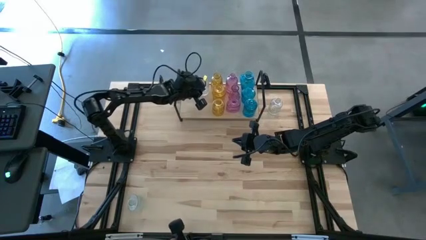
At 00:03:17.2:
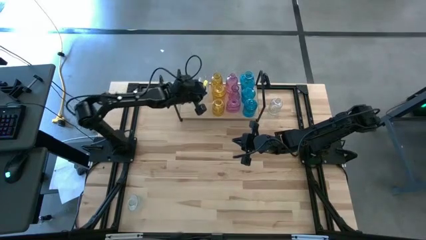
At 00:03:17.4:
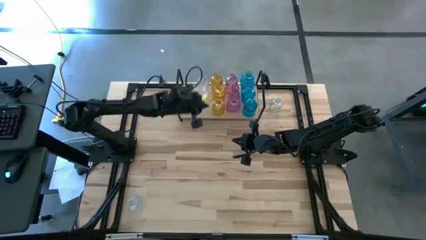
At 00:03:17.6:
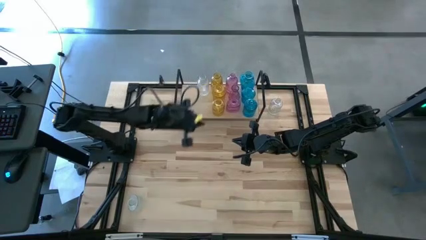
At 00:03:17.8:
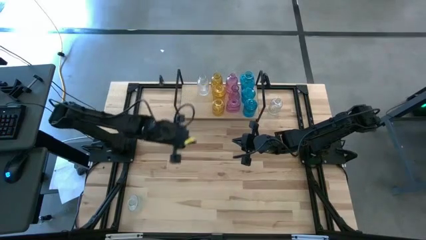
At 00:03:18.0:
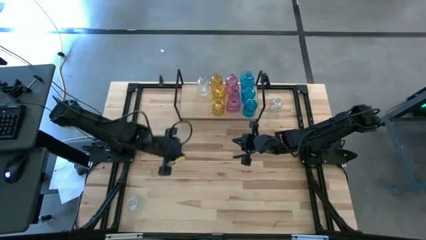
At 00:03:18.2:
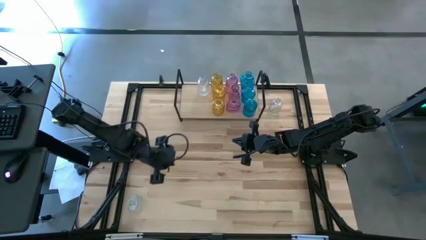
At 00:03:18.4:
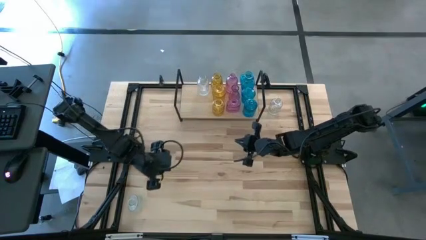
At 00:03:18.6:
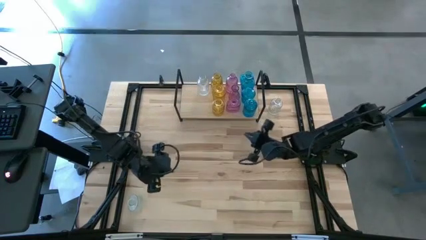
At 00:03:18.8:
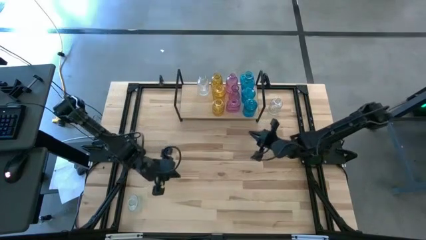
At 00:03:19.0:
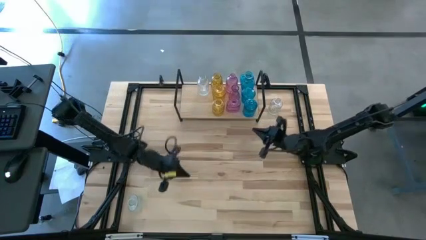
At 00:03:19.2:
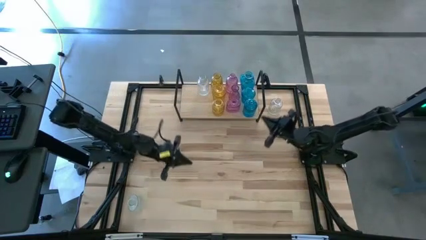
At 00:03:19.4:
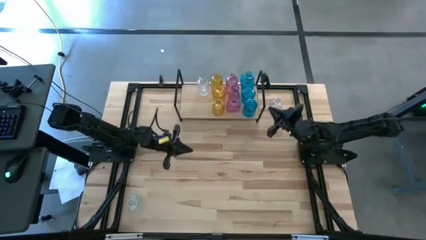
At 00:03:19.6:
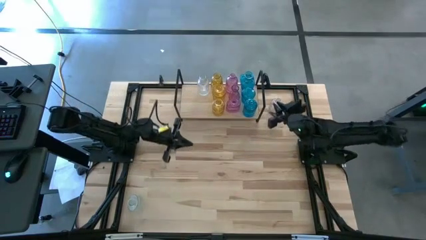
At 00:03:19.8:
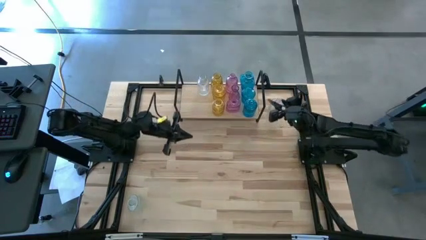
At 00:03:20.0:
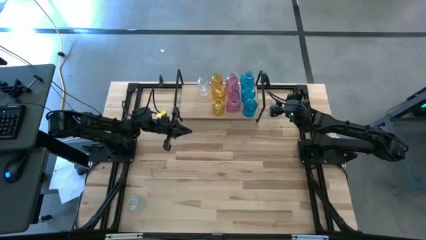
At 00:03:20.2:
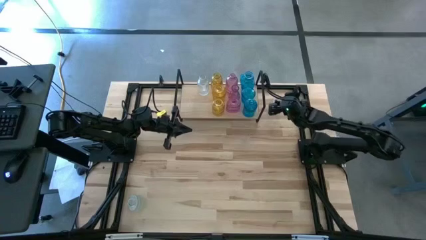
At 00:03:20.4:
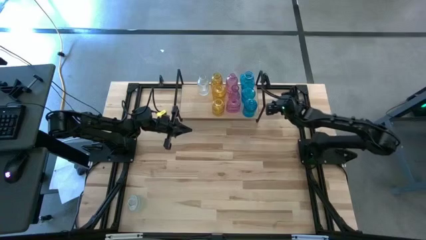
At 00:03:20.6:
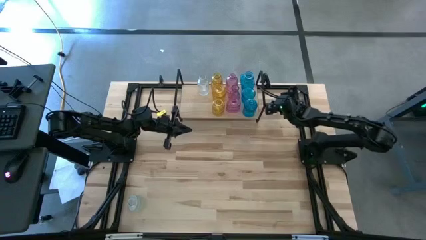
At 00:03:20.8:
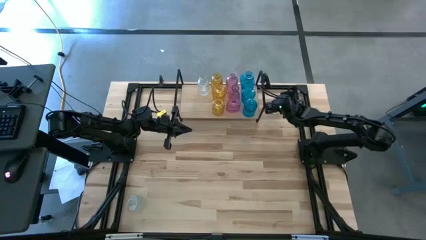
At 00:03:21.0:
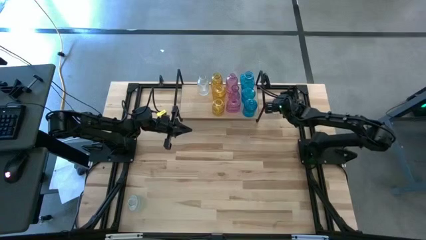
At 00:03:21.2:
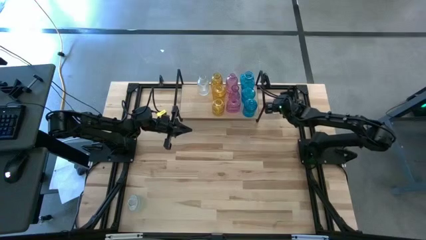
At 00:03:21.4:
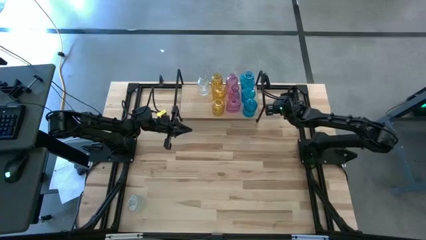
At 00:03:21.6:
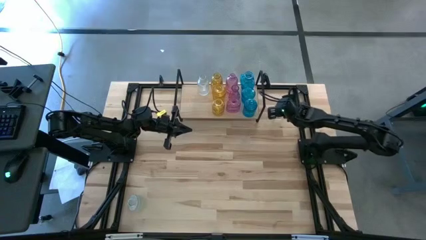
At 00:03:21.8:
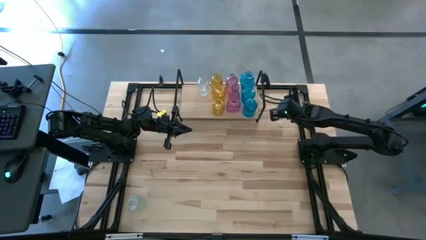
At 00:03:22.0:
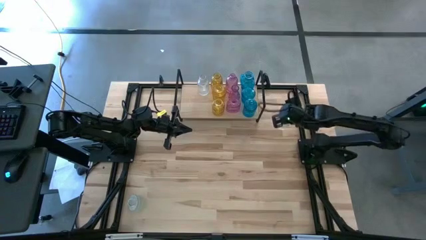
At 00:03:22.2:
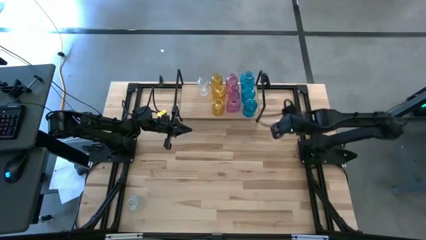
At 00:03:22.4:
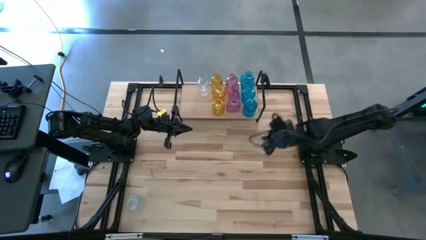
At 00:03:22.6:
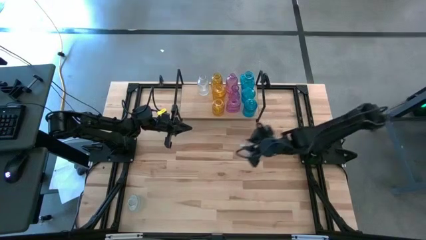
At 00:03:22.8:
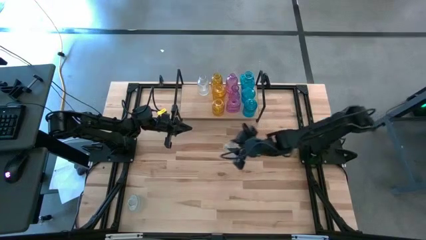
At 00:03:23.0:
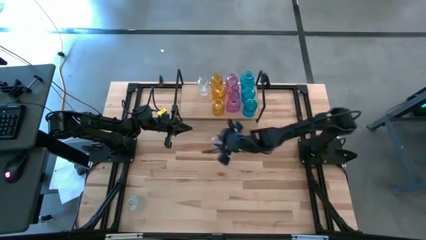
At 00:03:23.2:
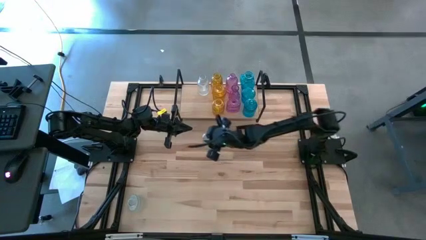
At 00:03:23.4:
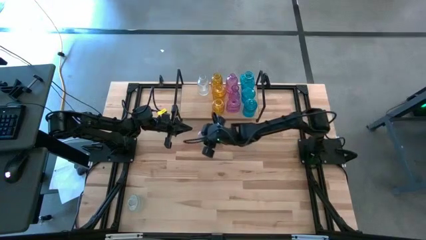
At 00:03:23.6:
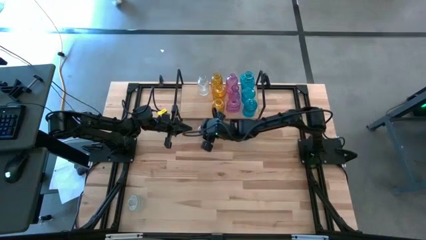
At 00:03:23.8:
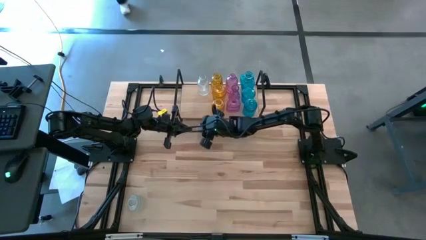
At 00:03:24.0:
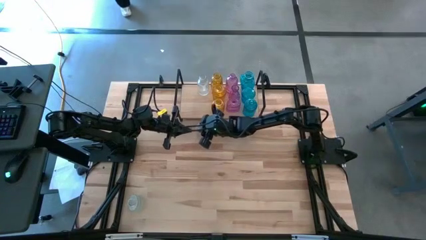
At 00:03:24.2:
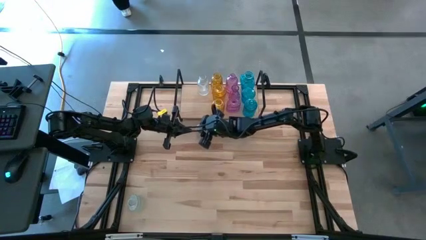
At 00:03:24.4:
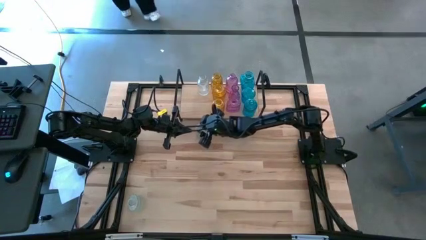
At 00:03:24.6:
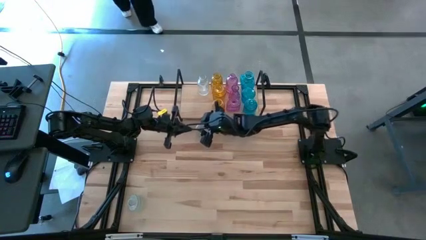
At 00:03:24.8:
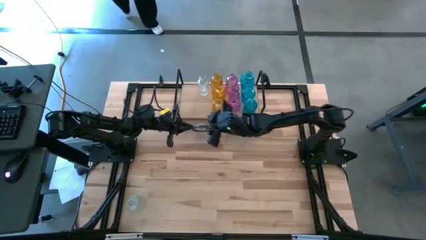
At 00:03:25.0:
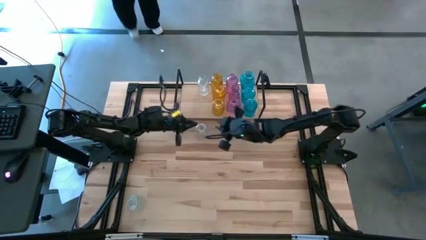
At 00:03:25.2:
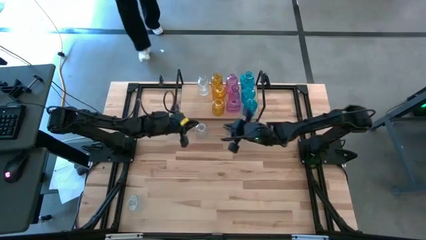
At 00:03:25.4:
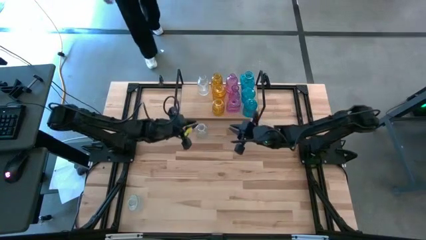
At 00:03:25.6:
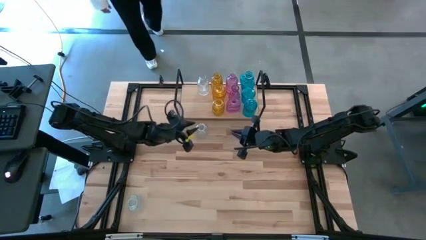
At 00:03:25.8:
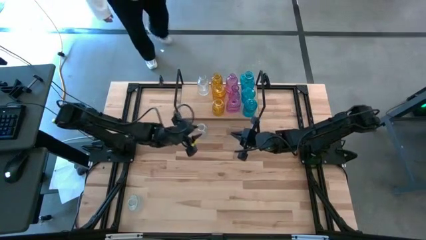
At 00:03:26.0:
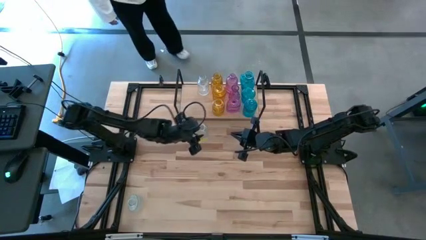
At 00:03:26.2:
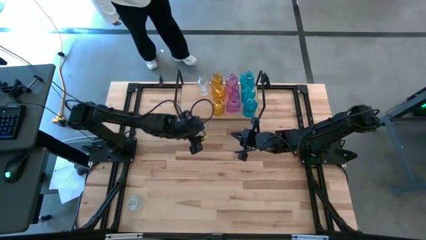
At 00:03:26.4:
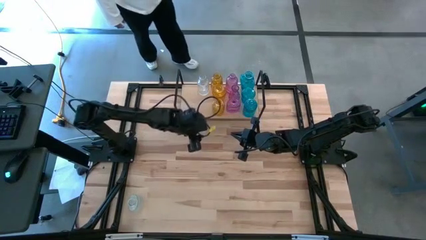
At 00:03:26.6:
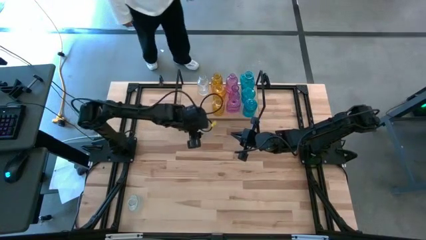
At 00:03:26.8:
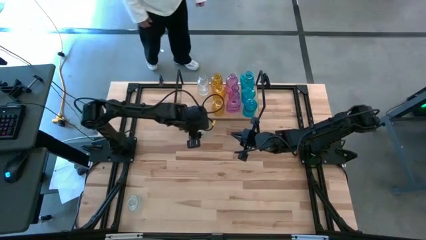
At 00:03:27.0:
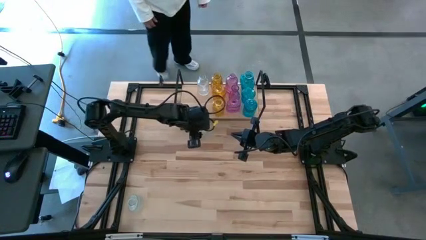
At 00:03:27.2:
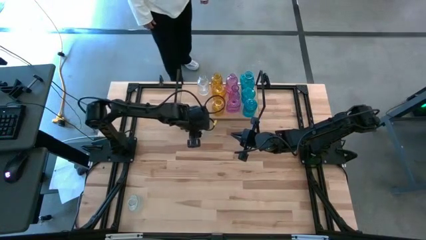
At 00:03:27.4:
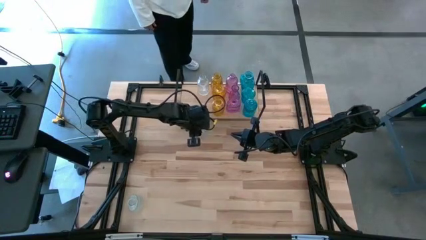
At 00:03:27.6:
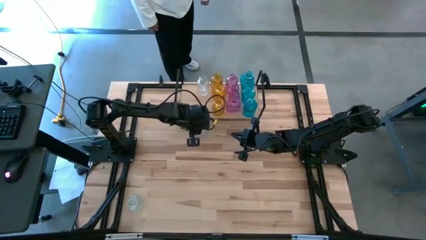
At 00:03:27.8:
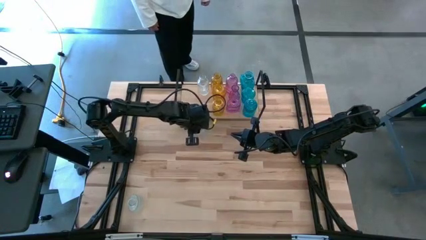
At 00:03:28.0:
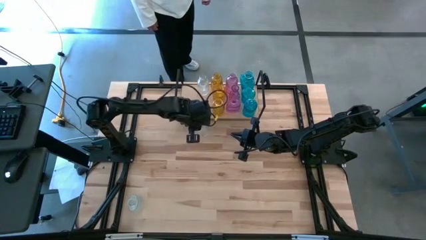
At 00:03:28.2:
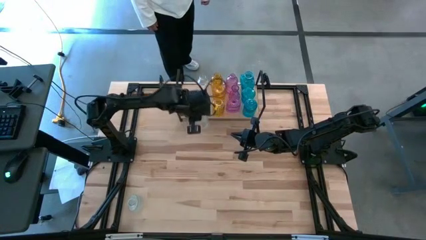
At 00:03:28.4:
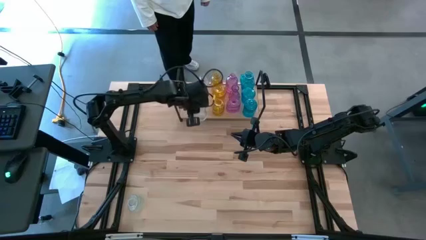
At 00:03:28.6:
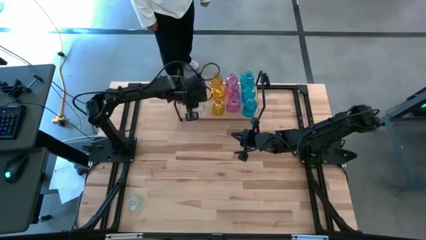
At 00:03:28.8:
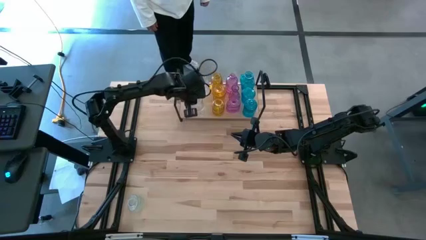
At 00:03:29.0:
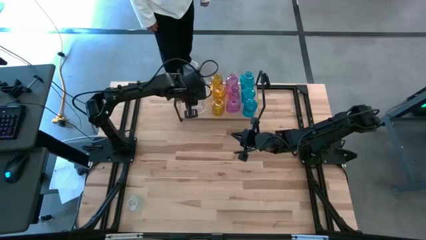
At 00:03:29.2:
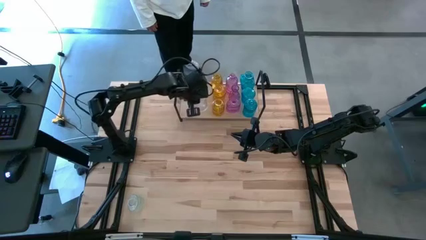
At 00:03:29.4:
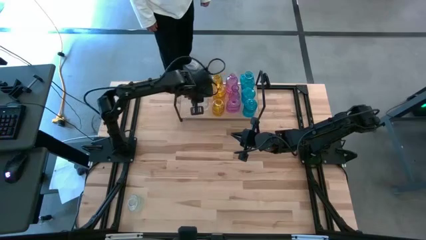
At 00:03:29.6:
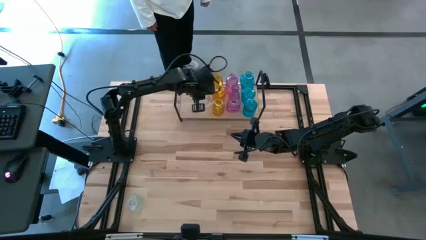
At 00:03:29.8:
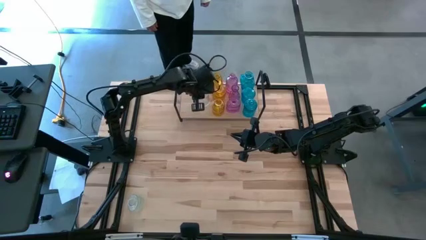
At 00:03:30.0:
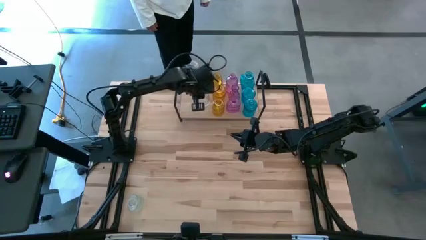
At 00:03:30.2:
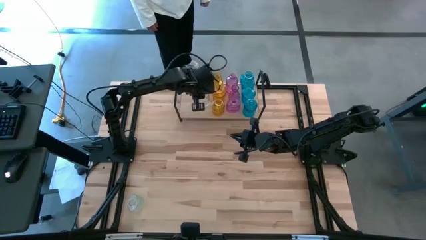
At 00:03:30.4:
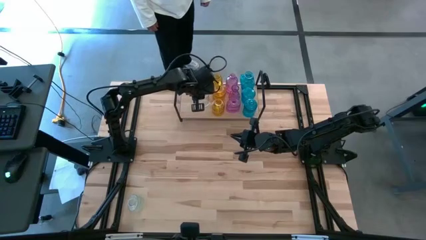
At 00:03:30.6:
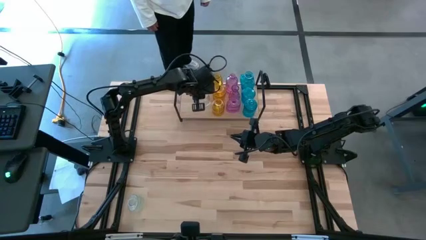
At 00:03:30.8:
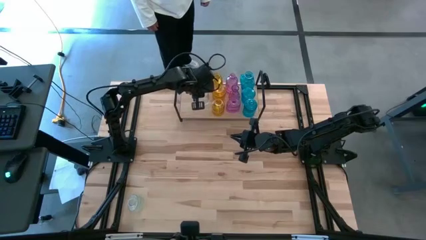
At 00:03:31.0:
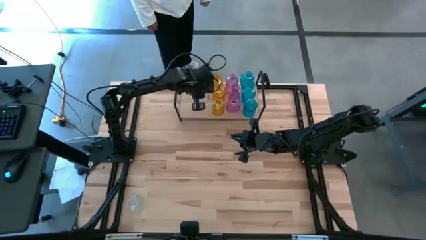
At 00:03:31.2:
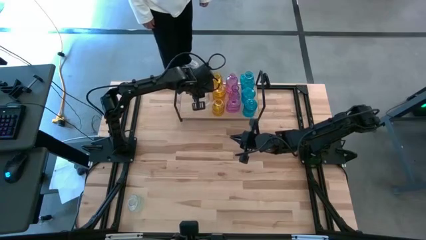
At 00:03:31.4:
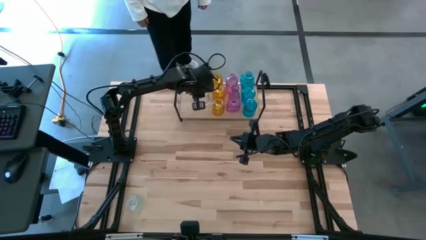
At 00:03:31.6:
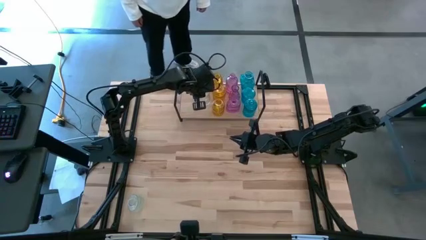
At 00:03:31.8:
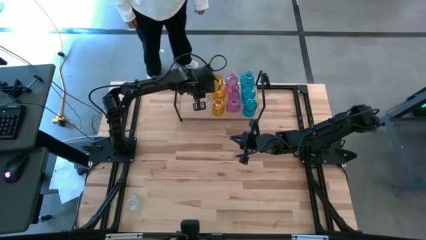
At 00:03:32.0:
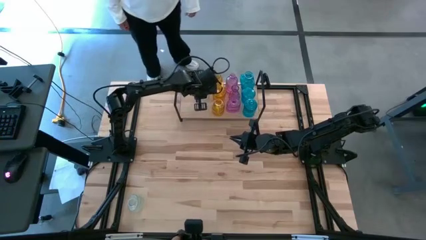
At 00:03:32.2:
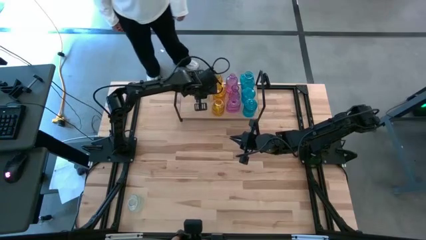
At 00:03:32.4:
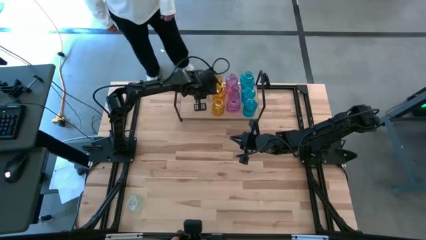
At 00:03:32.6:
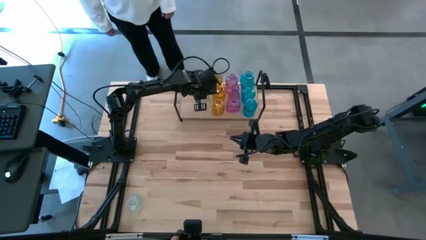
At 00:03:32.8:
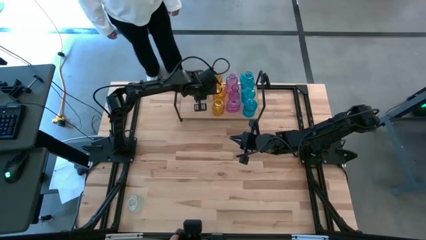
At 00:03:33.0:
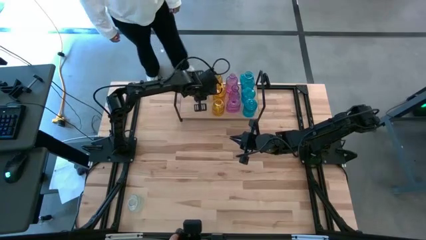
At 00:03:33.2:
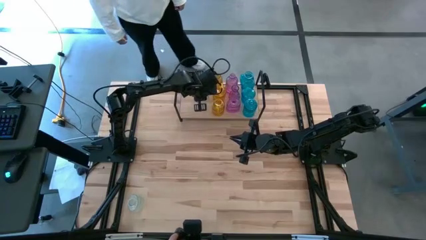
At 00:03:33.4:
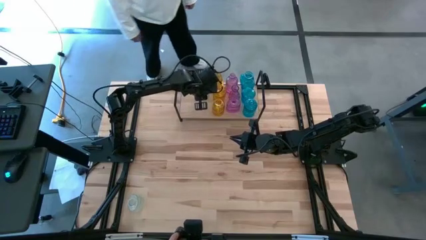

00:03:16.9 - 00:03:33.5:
Task: sort vases onto shelf
Put the top transparent vase on the shelf aligned with the other transparent vase
